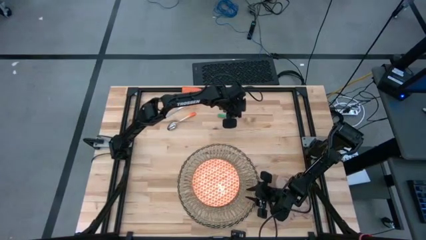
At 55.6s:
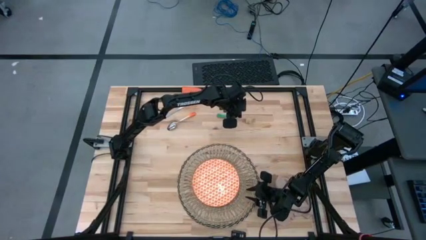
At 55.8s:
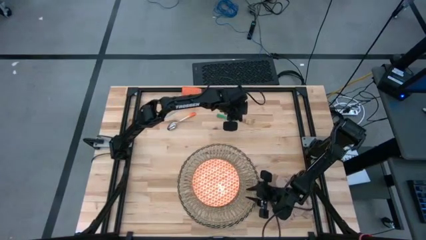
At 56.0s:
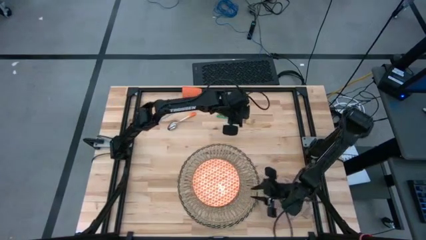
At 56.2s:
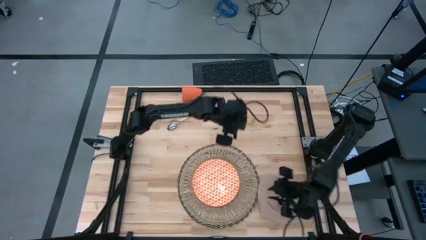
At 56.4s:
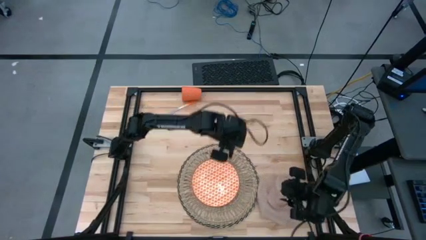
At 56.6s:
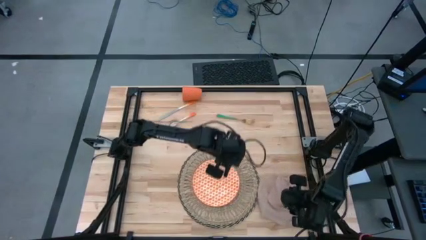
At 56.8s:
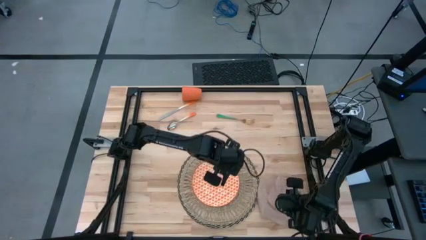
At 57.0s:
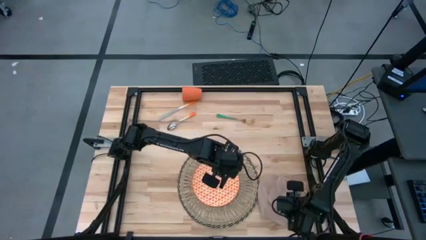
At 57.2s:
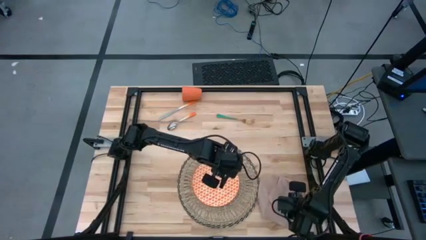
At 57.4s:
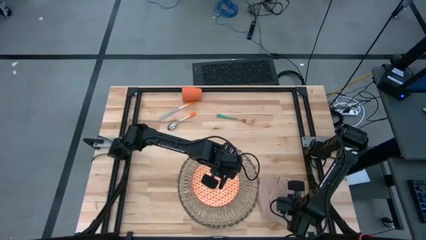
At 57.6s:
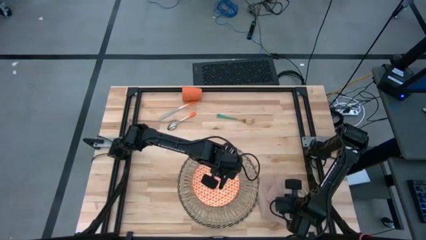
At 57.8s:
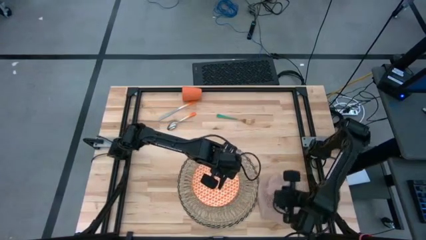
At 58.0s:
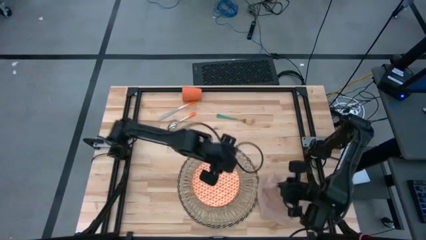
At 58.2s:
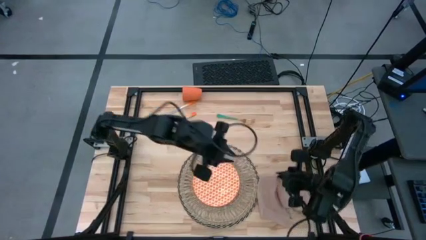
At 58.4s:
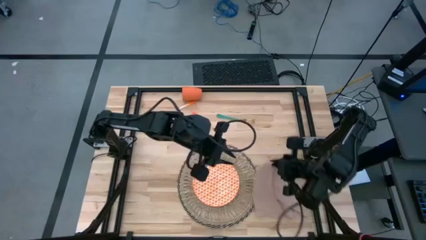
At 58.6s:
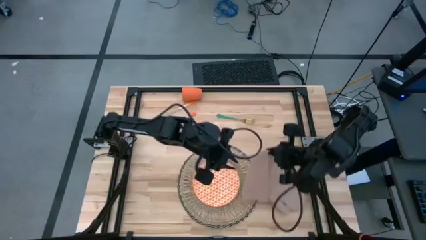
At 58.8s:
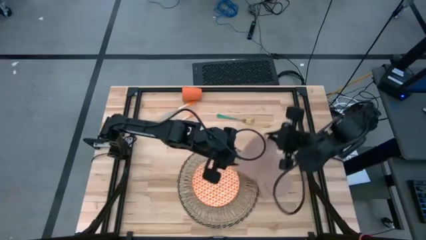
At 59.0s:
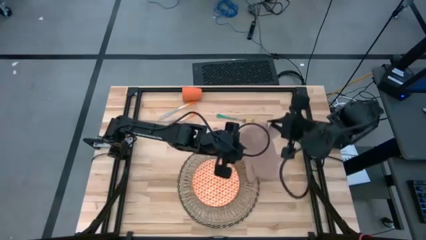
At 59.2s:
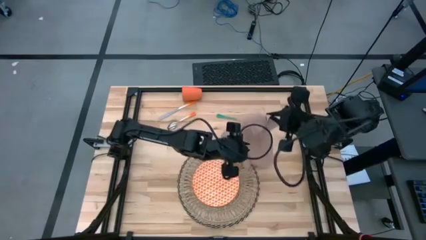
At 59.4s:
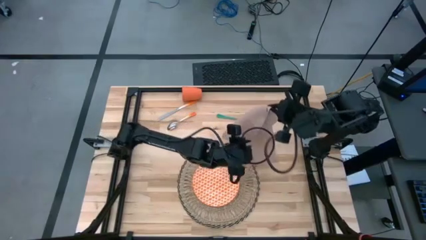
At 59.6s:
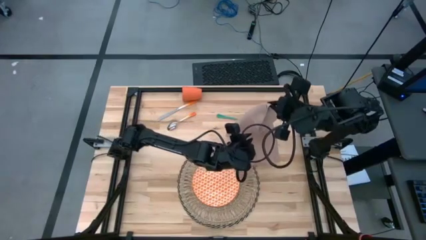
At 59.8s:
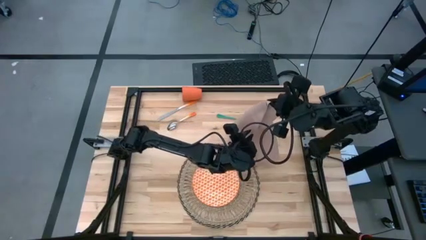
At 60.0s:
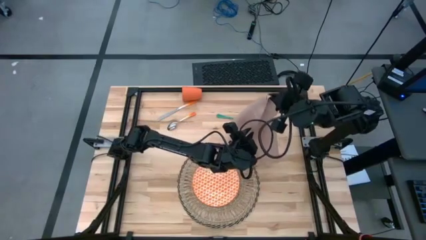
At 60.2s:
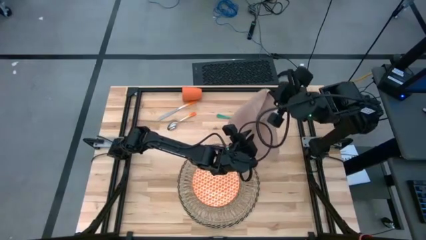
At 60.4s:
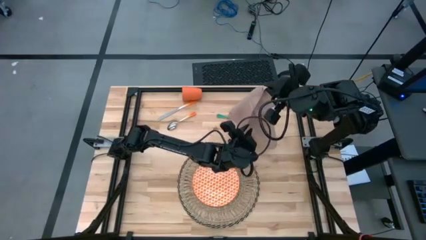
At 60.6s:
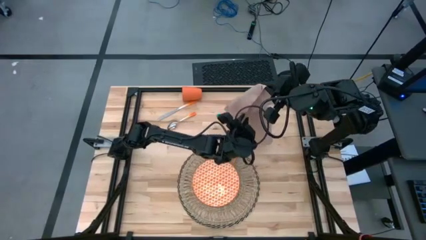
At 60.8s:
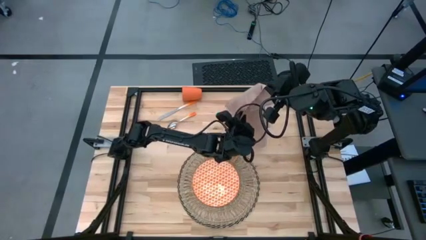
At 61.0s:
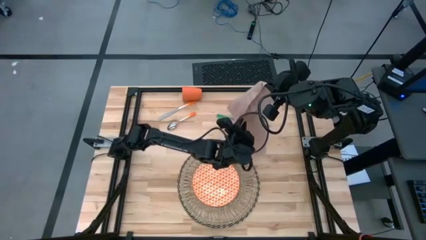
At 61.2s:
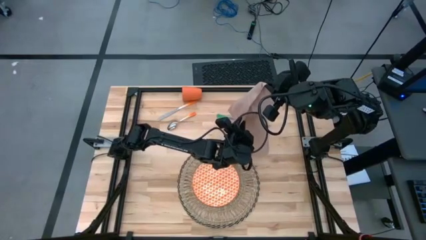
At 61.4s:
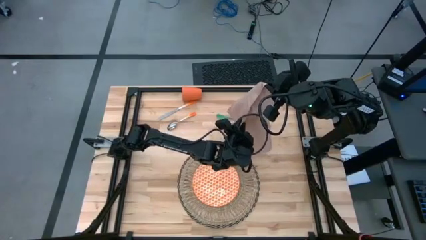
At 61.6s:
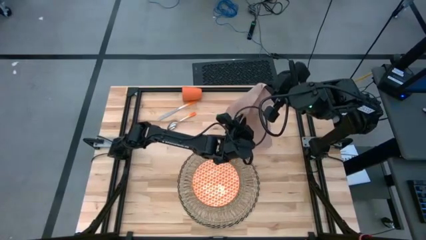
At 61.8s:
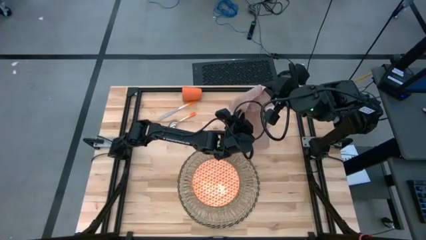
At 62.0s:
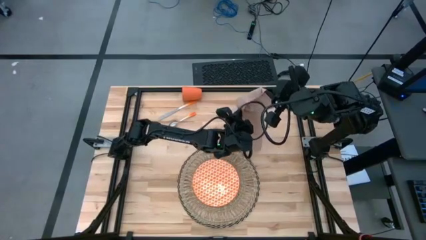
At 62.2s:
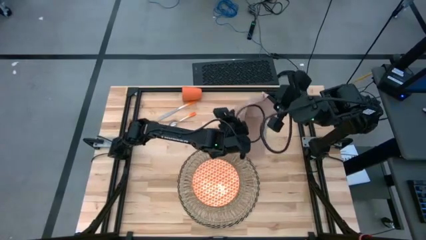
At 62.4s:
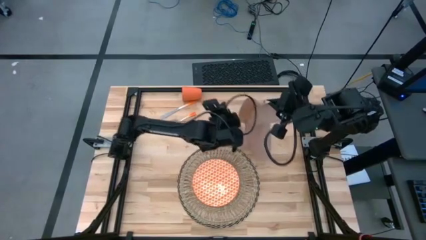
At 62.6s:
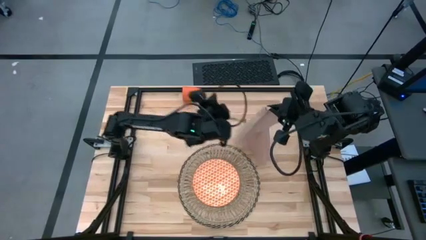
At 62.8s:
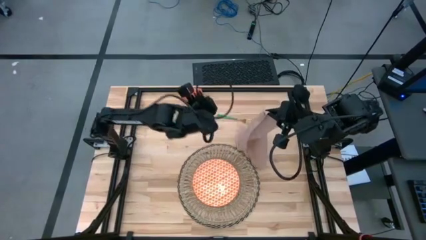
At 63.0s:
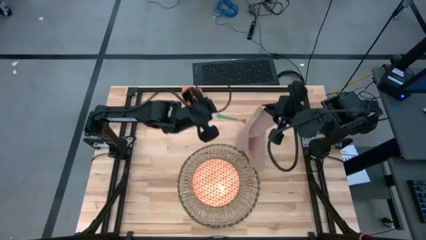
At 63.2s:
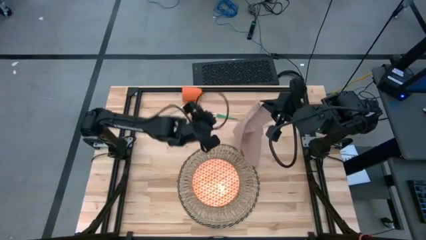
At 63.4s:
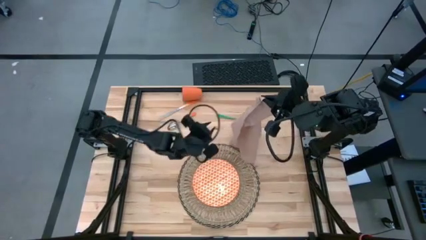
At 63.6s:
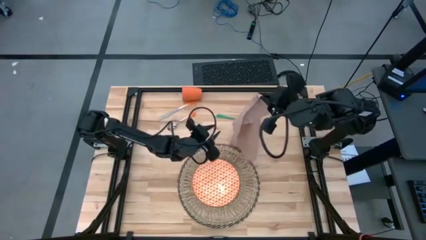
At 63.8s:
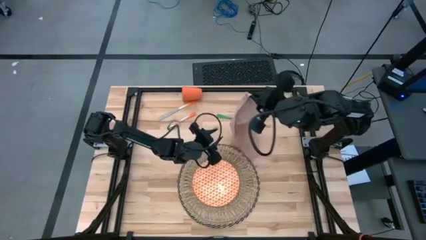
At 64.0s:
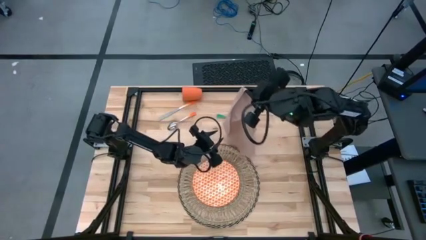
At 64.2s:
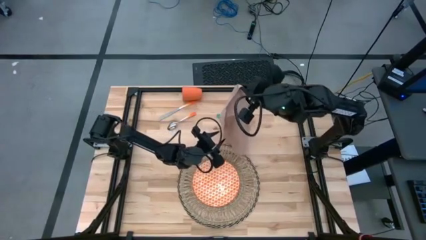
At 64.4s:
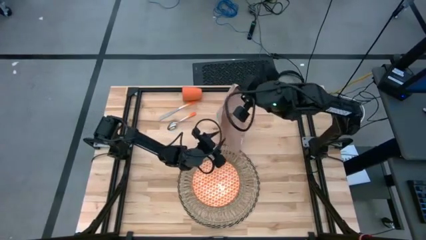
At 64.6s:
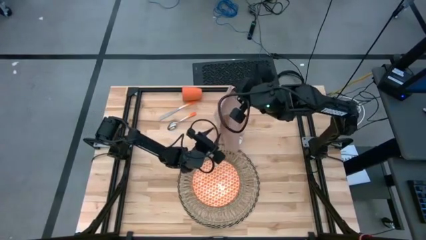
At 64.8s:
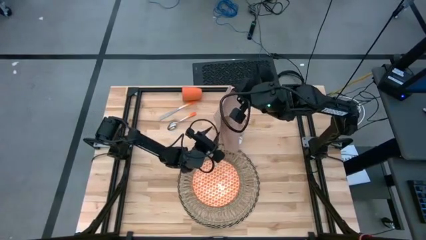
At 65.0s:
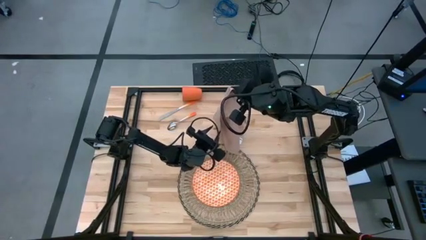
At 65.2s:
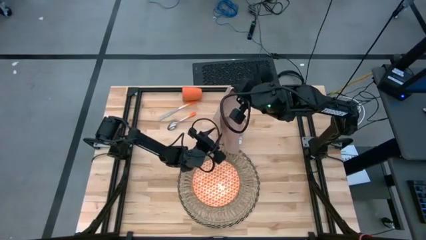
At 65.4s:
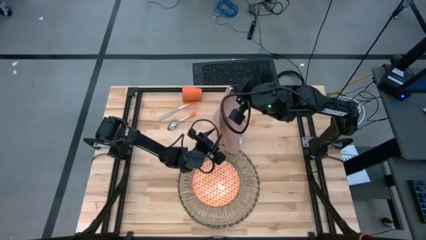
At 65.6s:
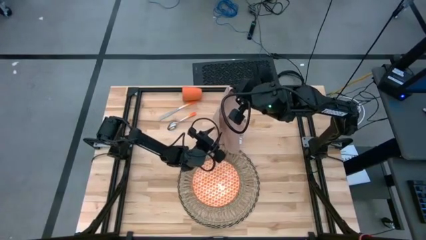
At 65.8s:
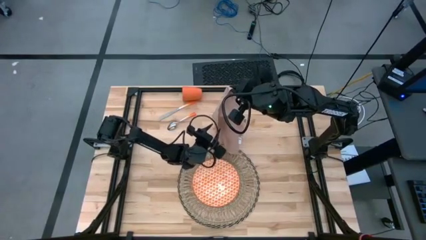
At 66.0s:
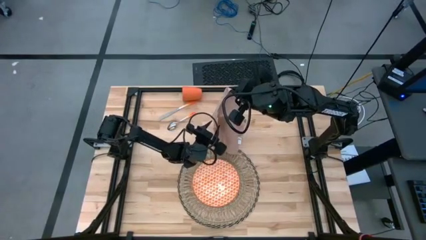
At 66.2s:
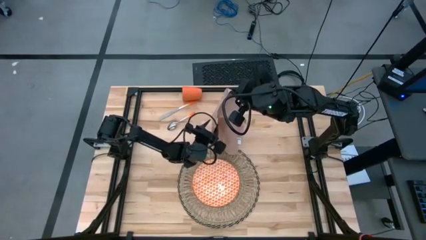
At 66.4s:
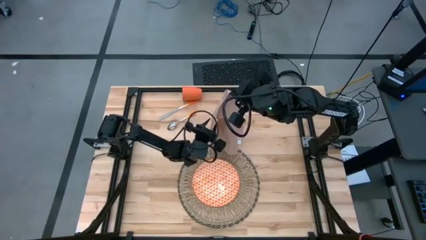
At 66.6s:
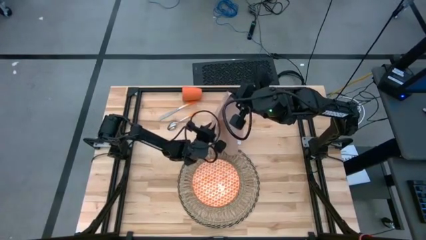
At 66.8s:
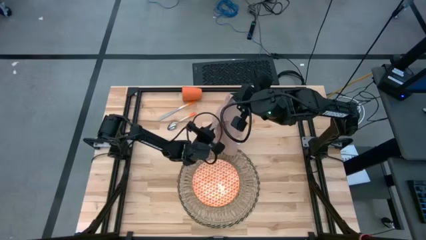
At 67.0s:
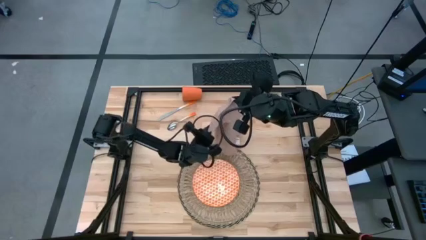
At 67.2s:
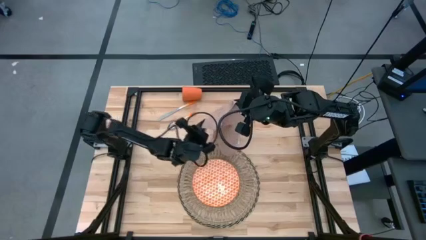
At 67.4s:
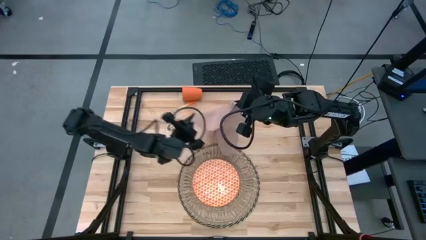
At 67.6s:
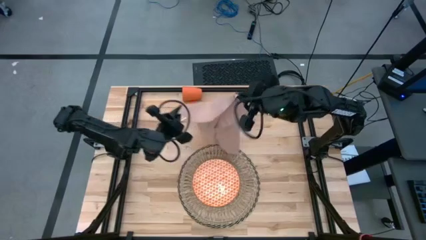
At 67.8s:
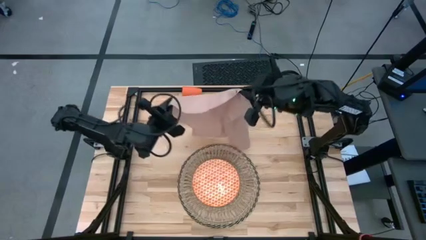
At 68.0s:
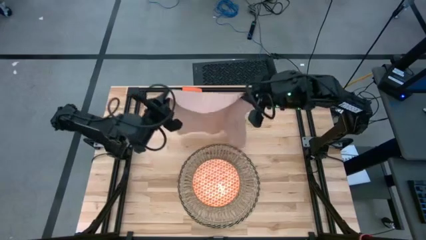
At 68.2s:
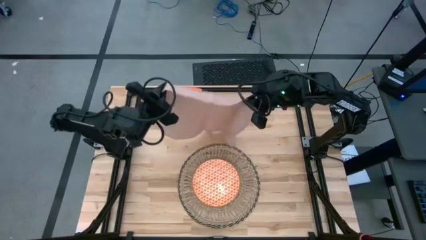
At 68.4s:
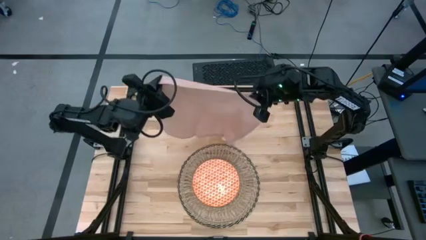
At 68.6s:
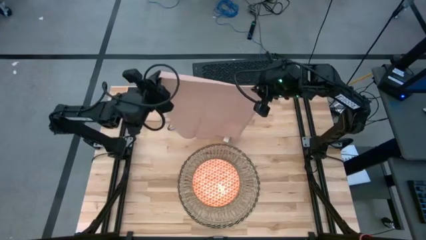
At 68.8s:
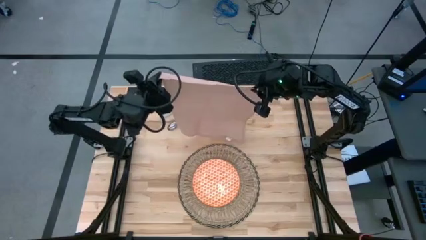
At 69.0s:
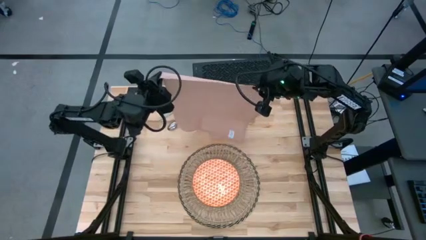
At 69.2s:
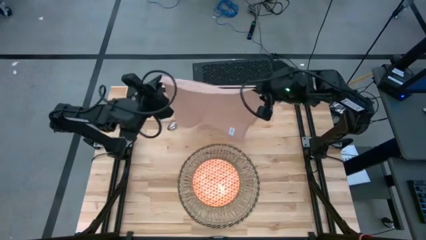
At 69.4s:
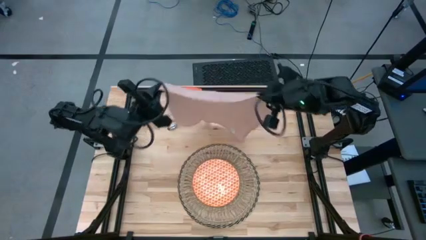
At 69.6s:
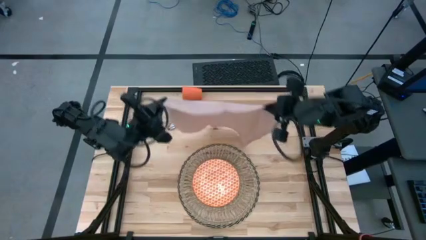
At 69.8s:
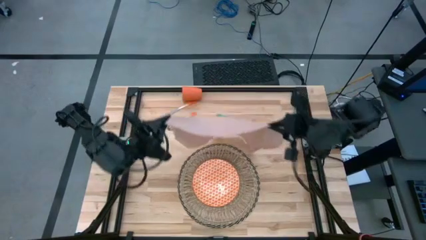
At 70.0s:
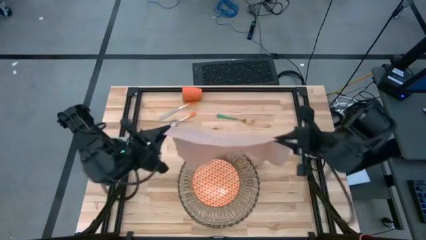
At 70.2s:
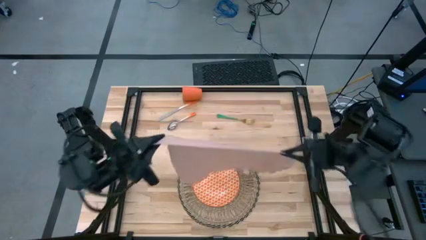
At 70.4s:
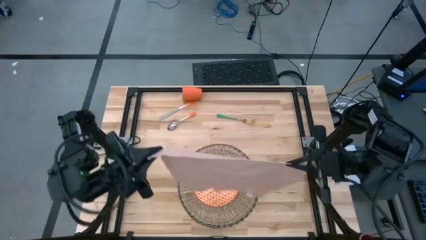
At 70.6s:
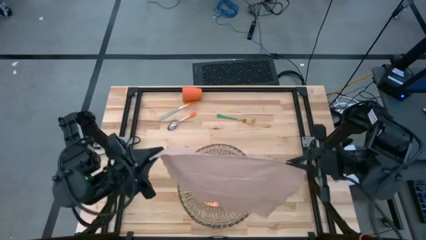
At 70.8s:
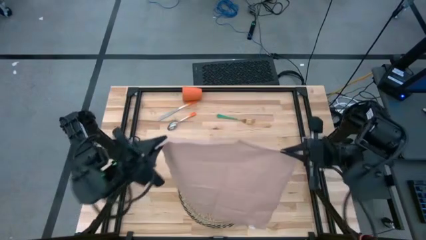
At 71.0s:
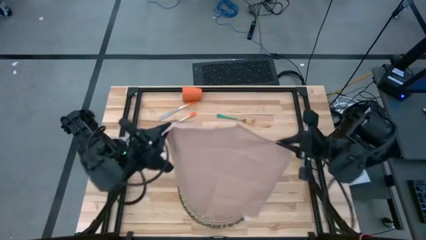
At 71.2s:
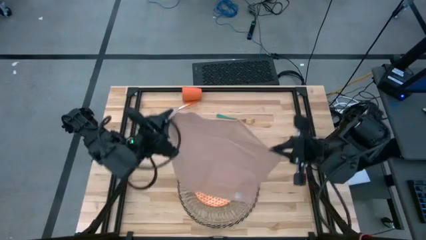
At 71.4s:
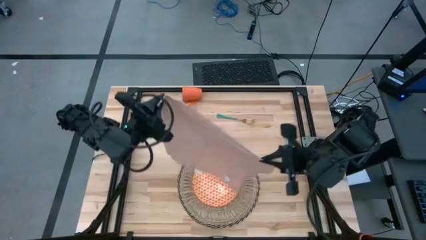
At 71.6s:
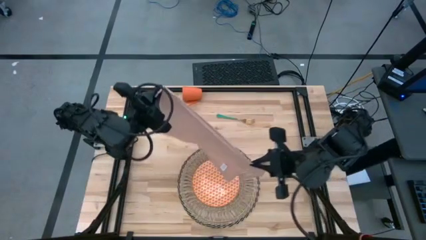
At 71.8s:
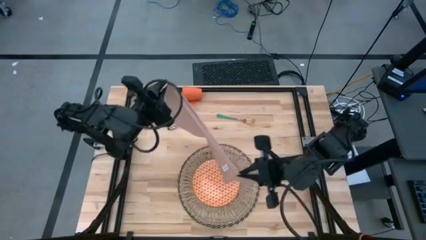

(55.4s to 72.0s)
Task: Set table place
Fold the napkin

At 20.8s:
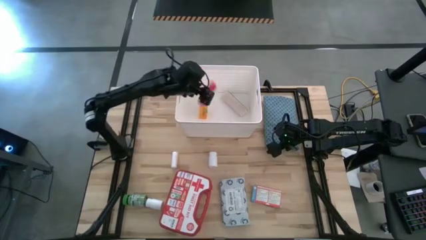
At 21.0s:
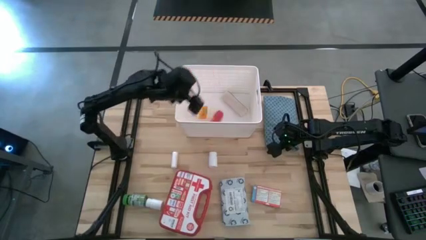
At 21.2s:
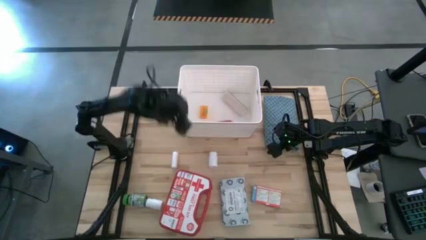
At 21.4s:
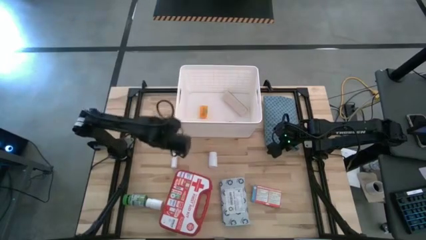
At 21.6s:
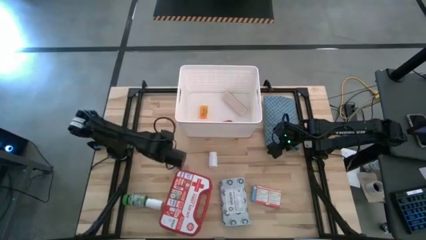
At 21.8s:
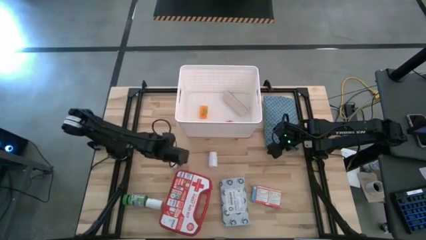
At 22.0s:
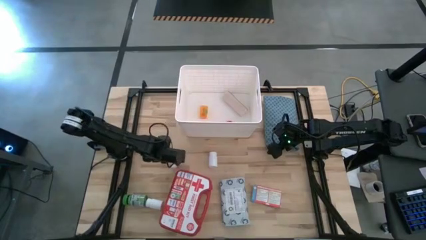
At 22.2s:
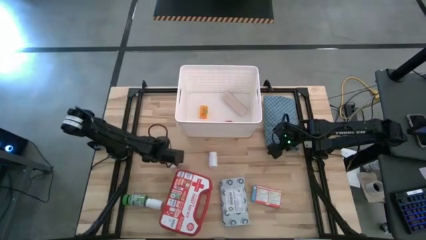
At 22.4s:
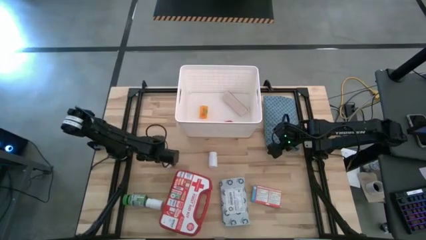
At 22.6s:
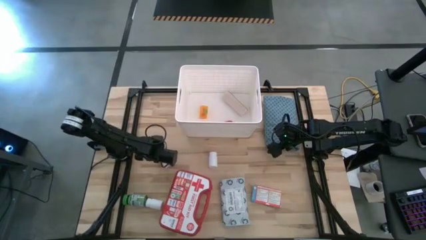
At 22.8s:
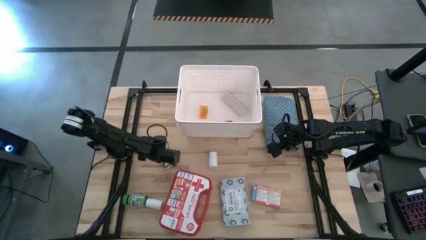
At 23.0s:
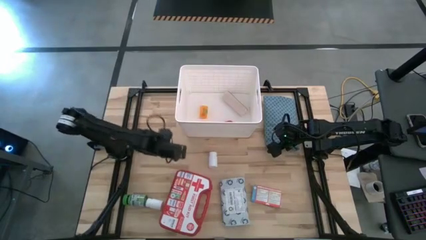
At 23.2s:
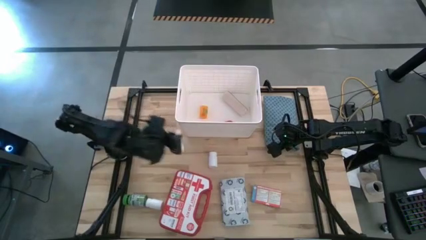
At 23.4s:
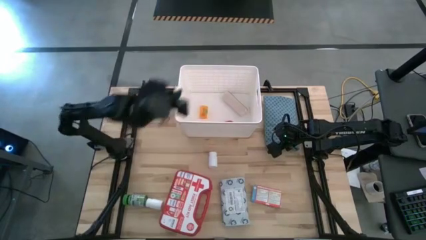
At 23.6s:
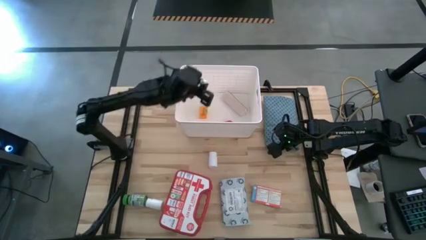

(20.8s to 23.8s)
Task: Pick & place medical supplies in basket/bin
Put the white rolled gauze into the white bin
